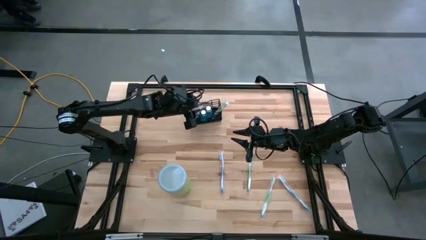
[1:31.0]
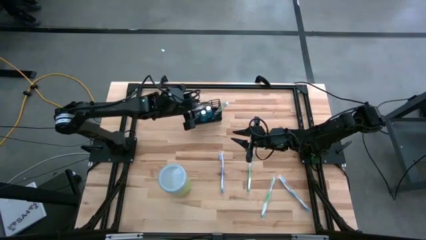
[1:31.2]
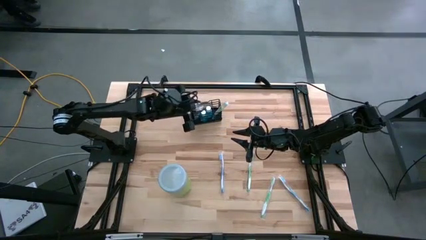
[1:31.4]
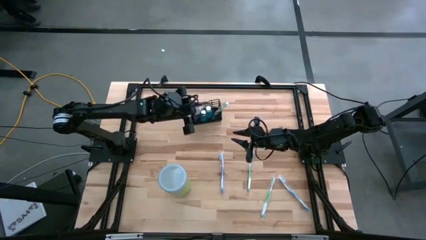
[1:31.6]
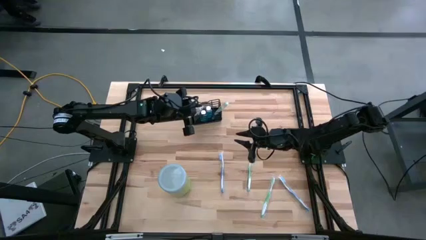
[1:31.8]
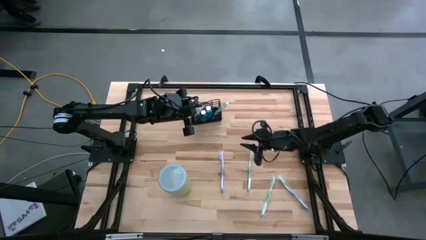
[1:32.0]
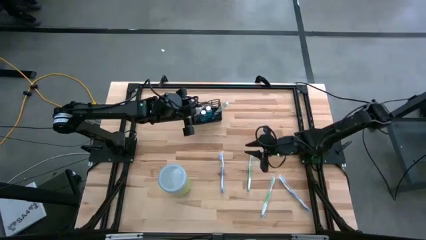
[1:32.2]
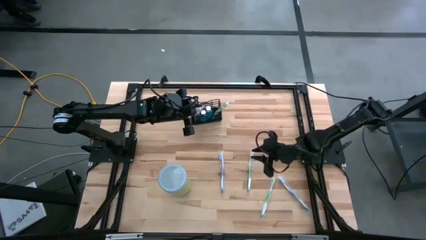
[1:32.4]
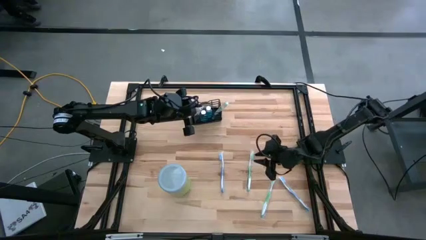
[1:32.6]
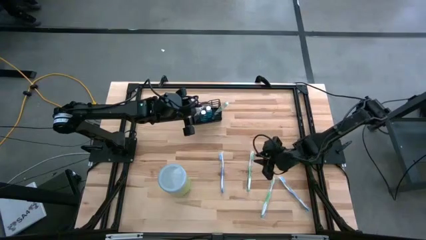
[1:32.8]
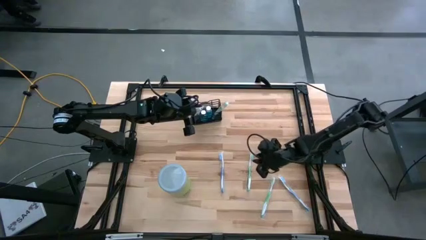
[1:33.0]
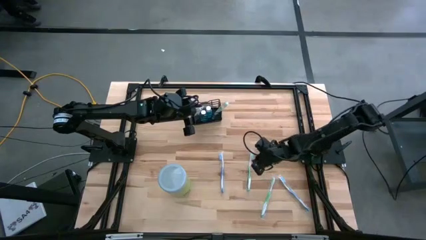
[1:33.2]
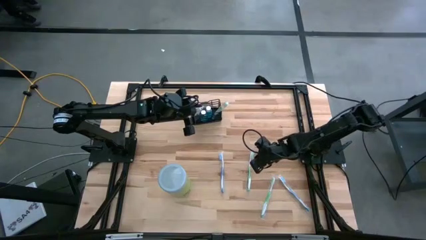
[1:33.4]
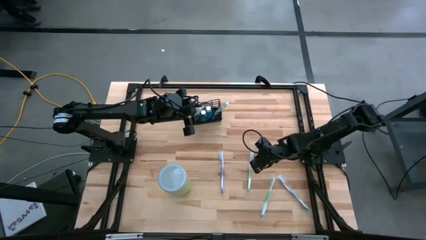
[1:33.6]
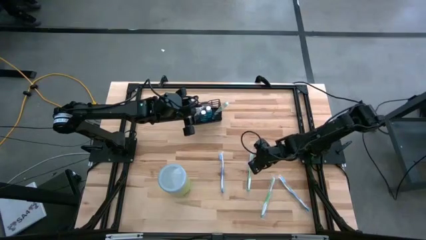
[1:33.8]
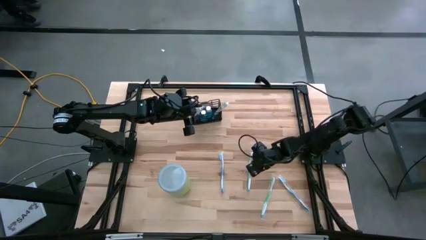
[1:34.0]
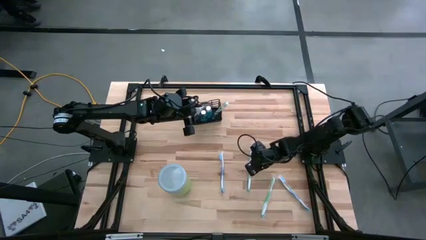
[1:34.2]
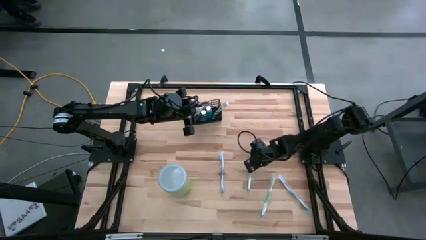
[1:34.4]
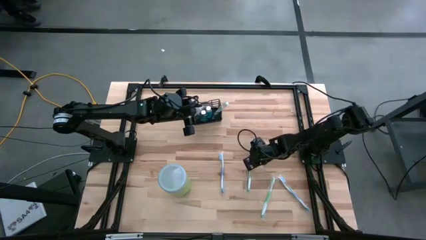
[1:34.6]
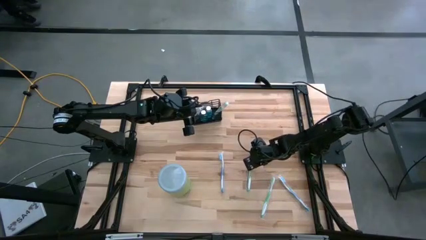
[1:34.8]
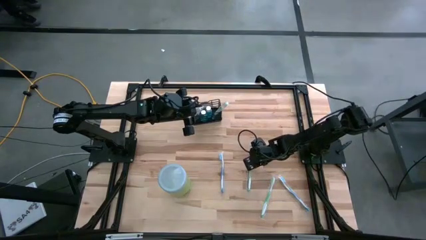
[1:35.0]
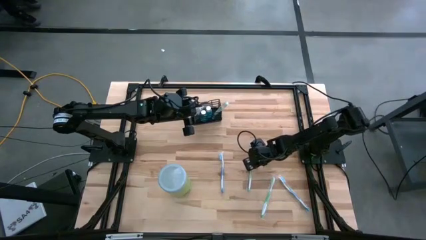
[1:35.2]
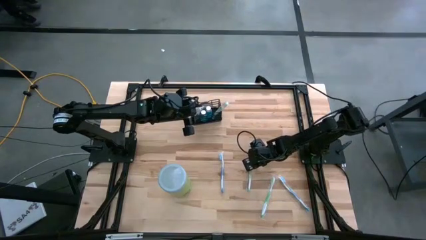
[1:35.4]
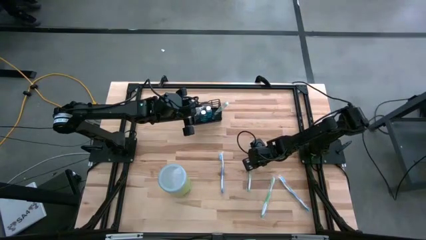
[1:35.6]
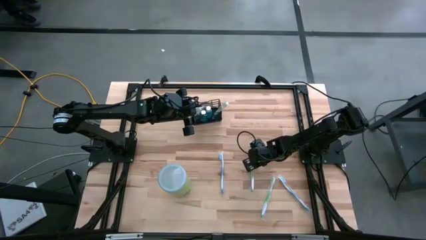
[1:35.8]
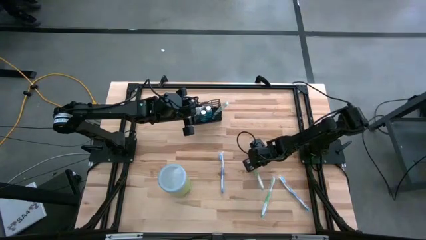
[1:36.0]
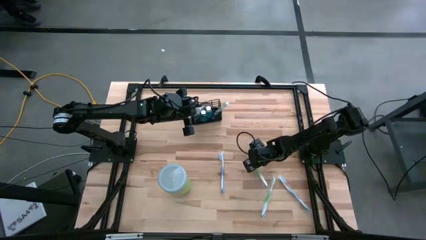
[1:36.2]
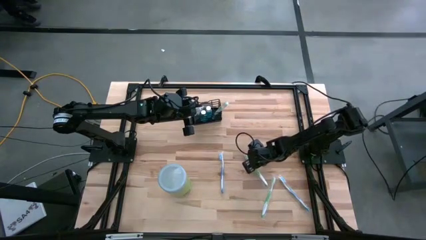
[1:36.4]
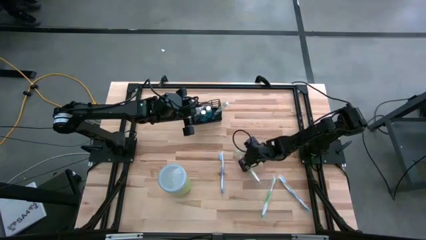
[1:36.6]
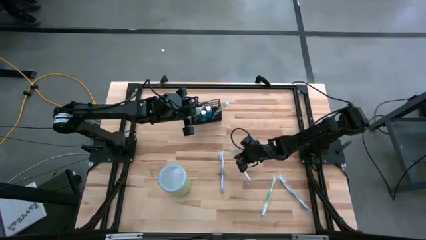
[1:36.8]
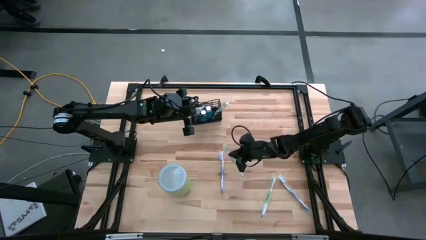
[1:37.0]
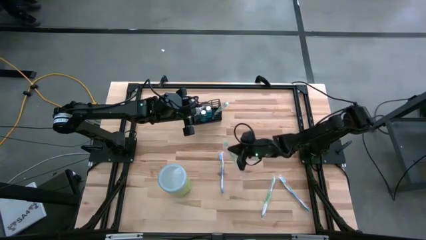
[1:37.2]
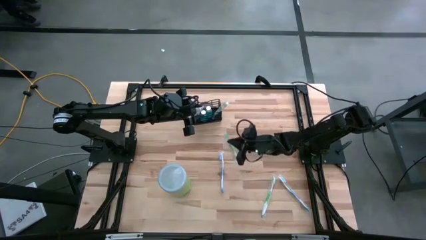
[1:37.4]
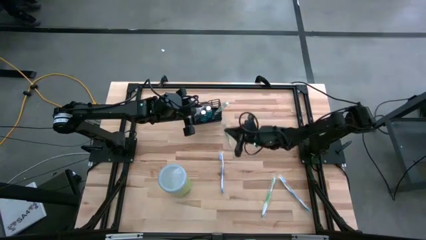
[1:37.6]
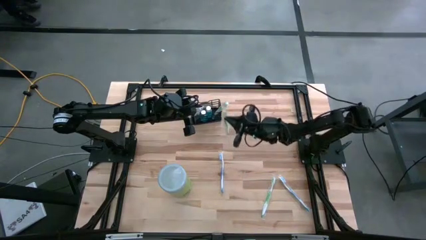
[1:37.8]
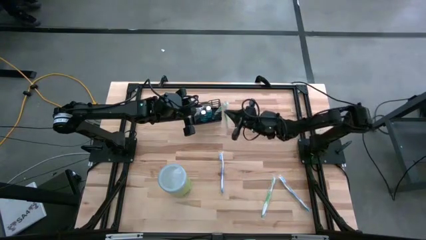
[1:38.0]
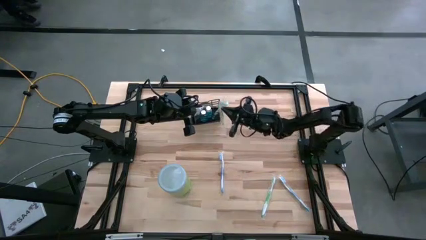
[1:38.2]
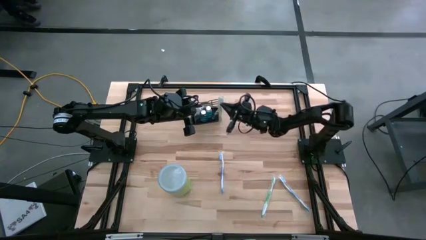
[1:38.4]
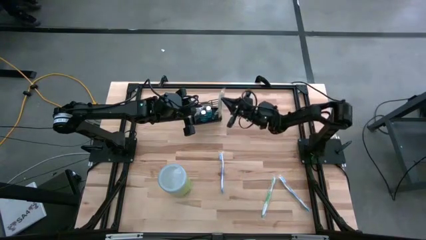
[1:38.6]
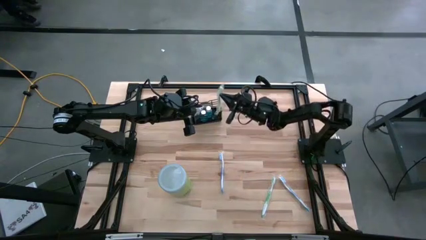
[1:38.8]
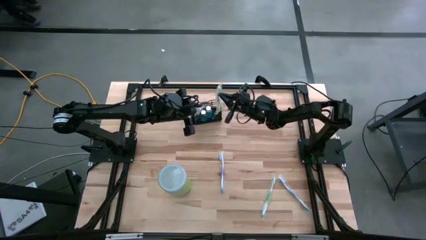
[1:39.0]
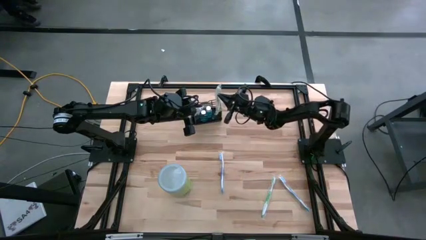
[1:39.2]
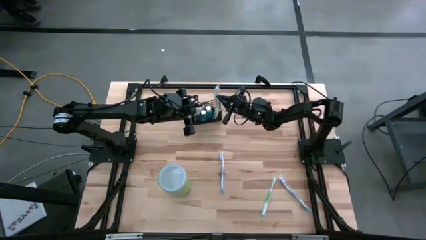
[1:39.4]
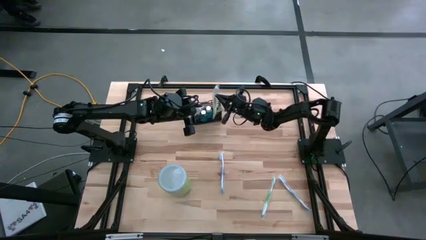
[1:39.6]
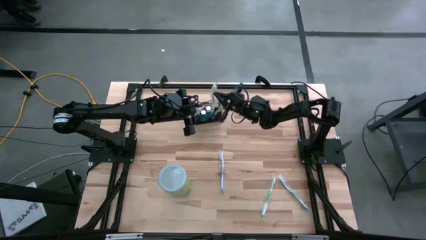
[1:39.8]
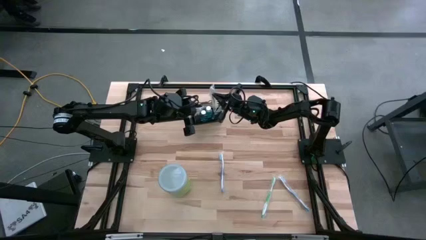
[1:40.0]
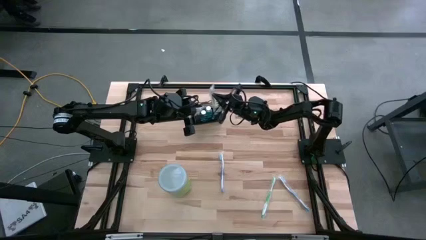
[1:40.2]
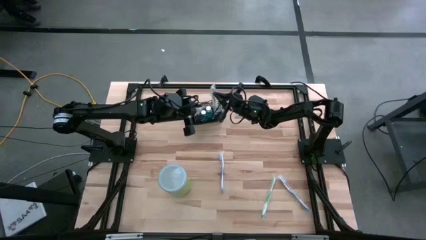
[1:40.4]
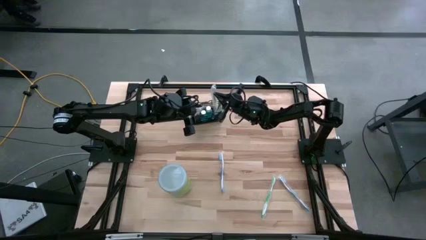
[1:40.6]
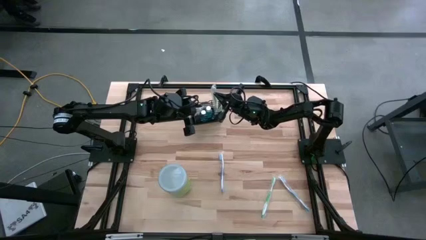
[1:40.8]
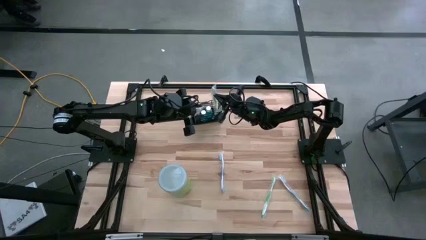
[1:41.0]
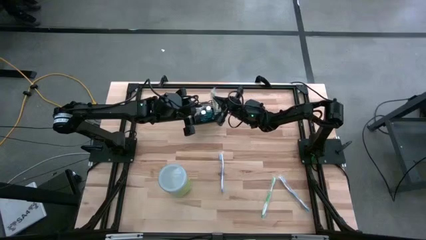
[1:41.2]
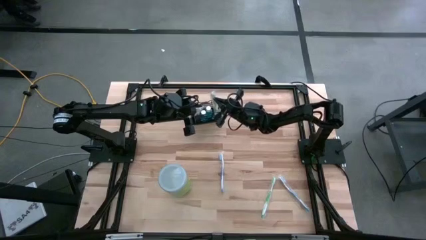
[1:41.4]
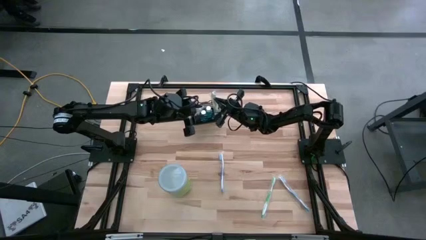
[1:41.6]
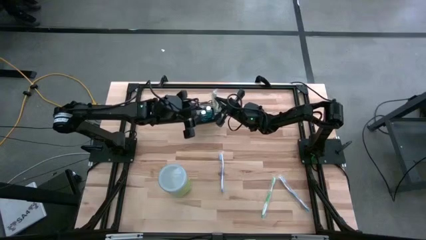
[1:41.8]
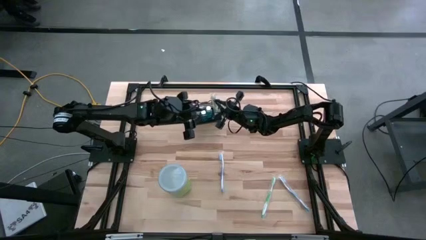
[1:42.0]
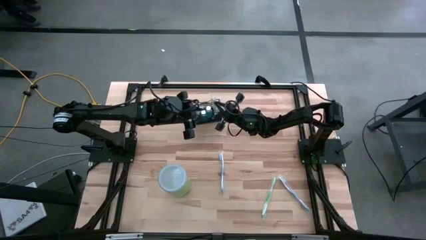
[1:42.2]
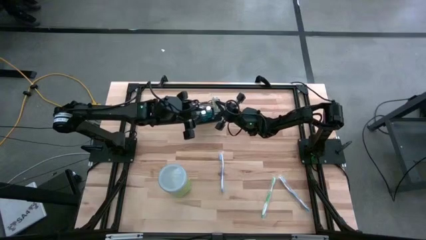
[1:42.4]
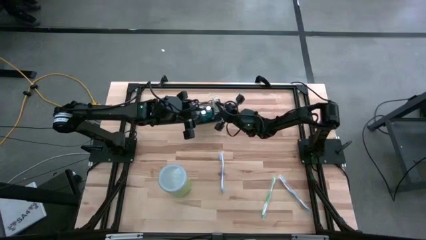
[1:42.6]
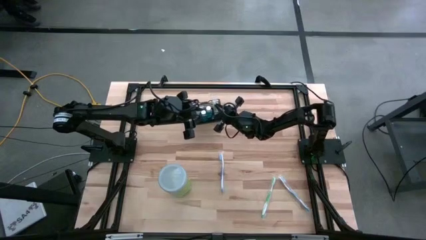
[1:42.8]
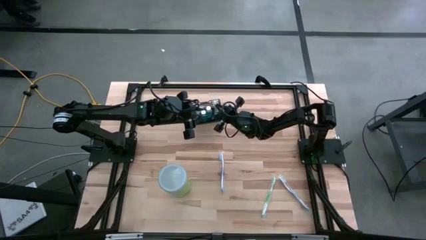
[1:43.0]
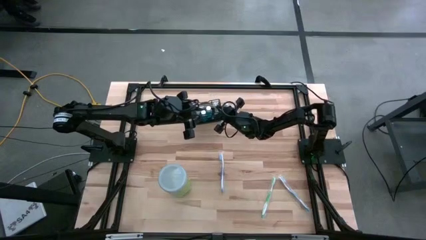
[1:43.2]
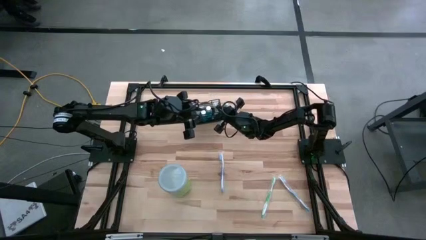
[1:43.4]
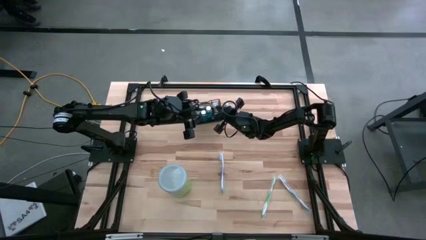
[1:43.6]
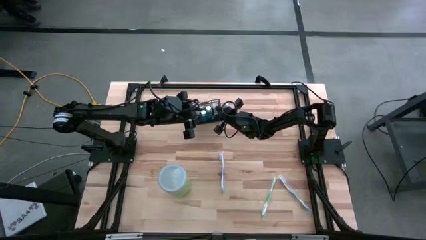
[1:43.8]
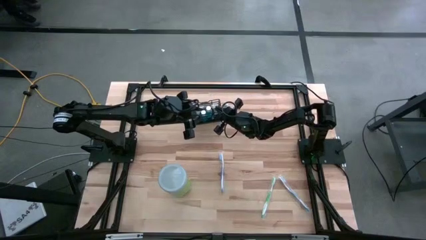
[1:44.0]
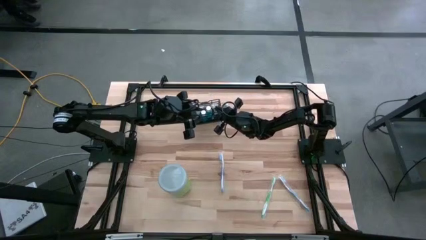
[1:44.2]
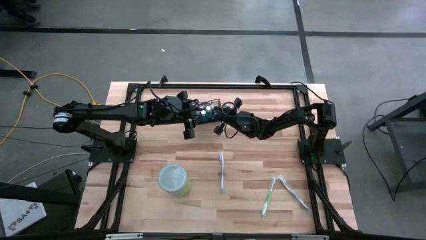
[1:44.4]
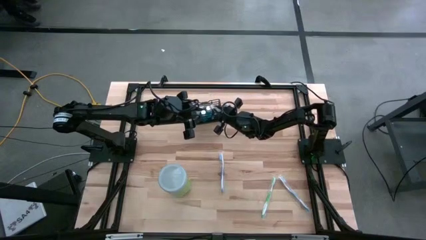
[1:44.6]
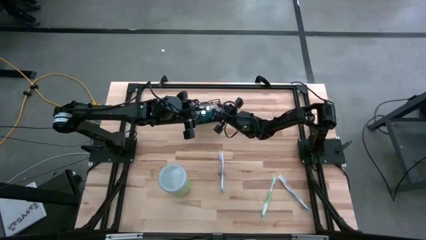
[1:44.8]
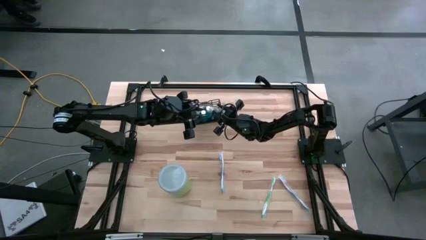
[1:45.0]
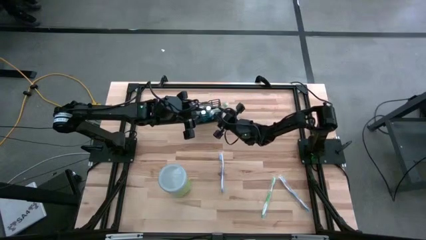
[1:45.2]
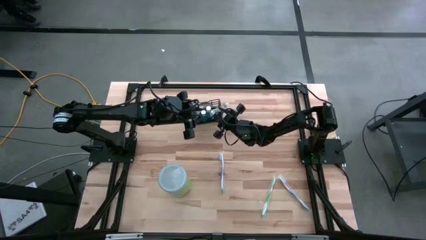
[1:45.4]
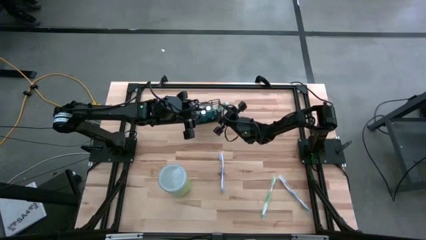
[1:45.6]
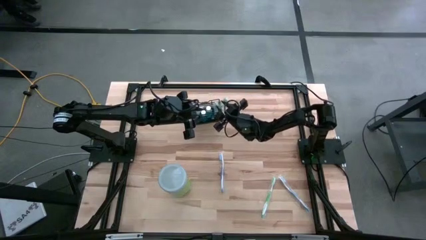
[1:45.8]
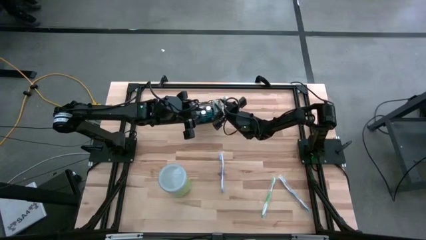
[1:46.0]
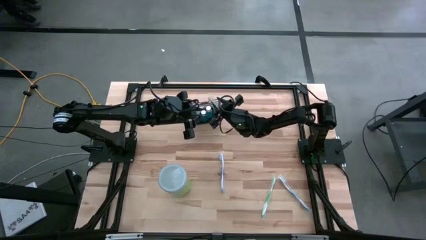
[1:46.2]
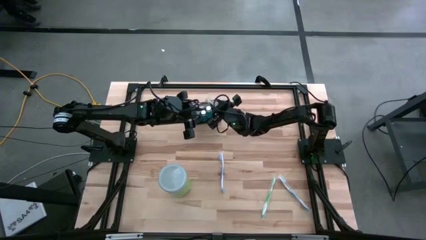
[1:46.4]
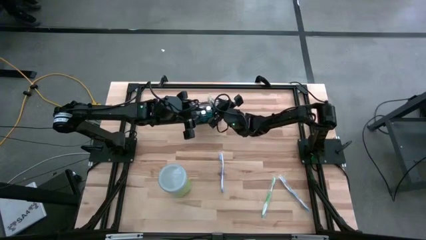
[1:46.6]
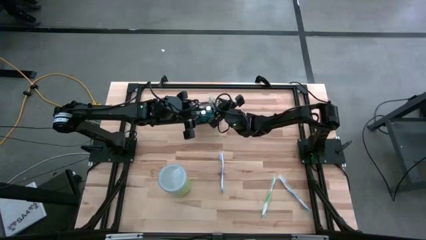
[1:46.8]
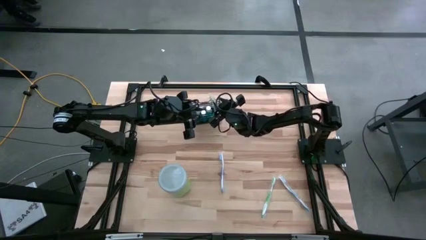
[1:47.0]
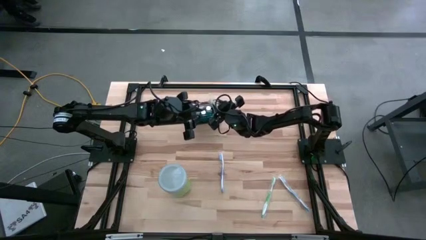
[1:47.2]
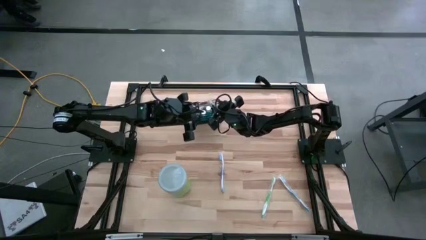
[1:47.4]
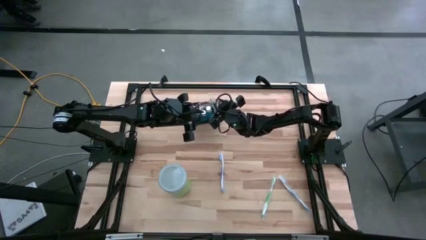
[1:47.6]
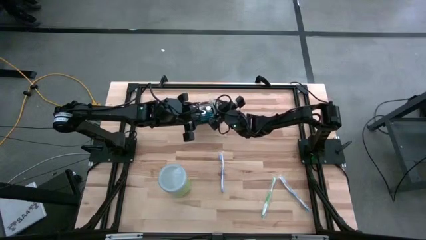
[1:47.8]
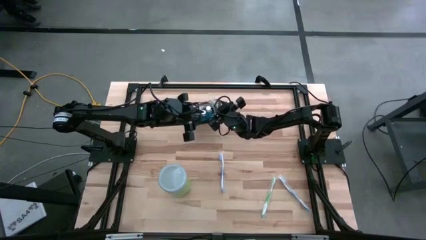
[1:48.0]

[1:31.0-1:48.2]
Task: Pick & Place toothbrushing station
Put the top green toothbrush into the black mesh mesh organizer
